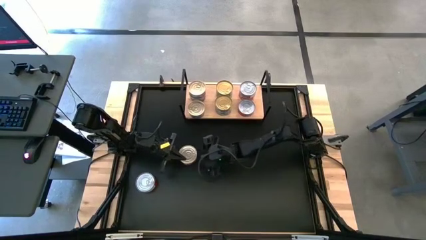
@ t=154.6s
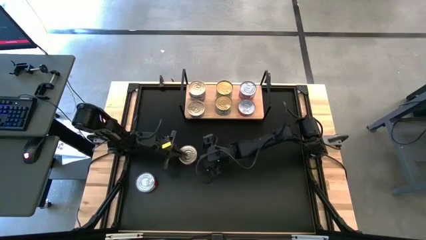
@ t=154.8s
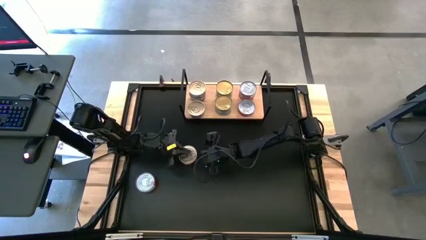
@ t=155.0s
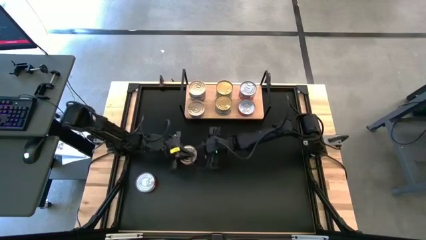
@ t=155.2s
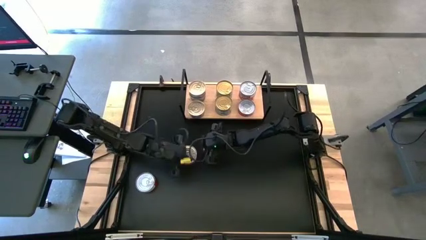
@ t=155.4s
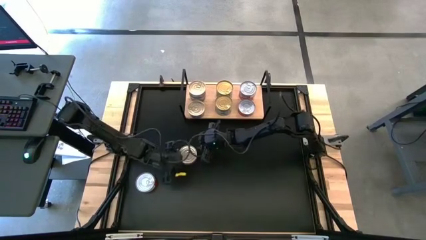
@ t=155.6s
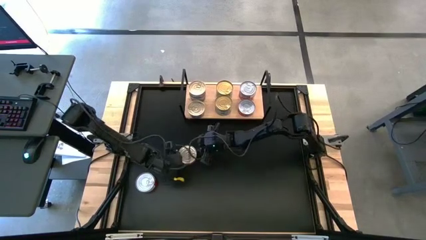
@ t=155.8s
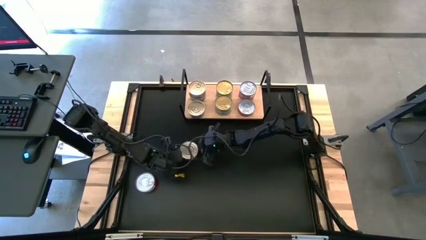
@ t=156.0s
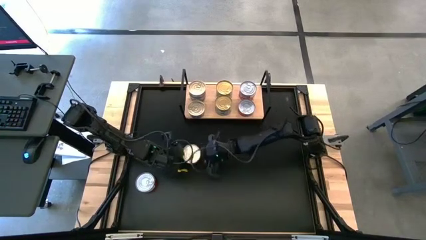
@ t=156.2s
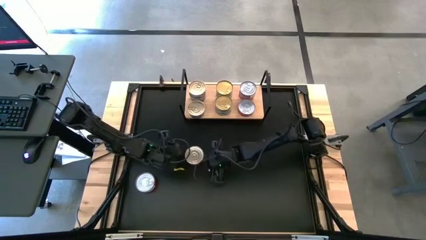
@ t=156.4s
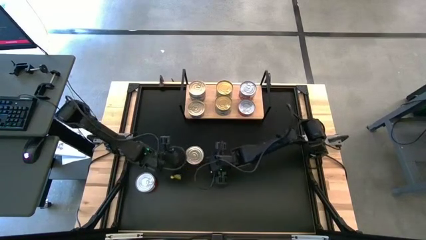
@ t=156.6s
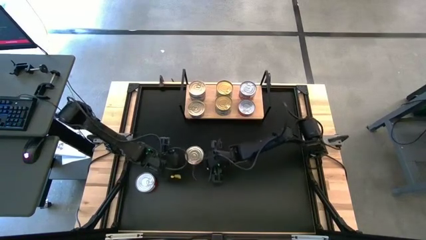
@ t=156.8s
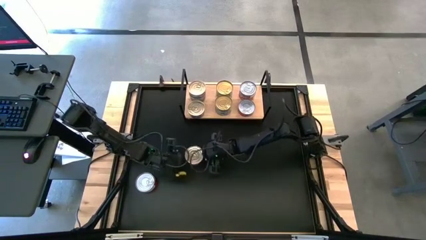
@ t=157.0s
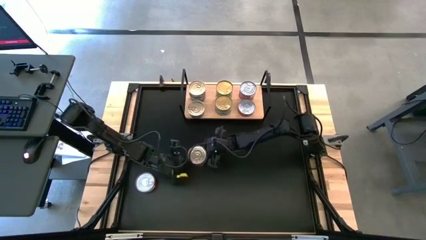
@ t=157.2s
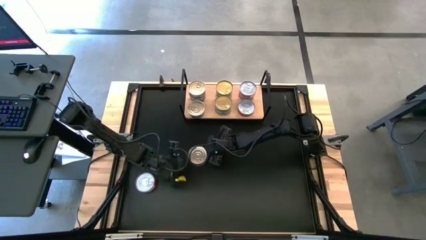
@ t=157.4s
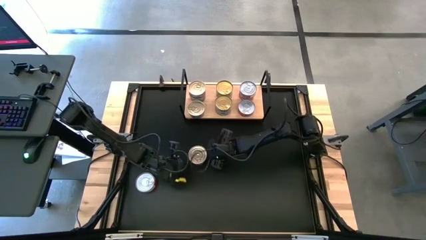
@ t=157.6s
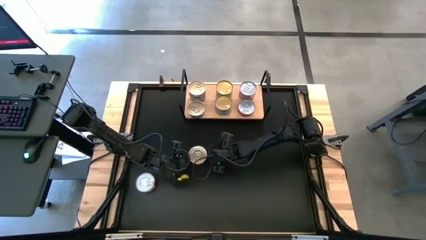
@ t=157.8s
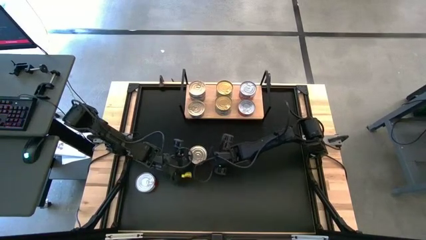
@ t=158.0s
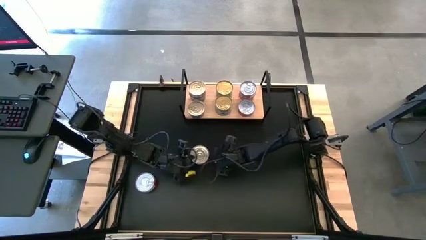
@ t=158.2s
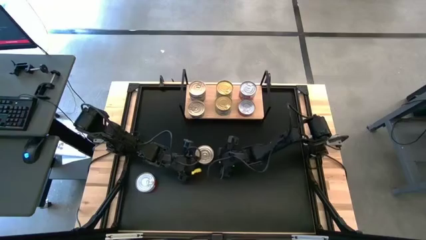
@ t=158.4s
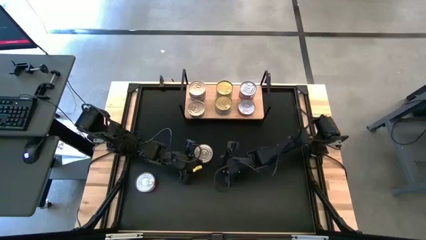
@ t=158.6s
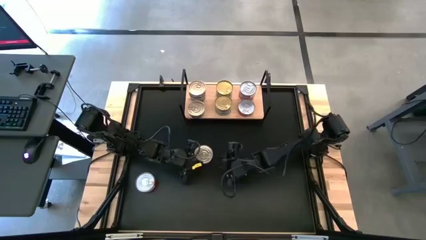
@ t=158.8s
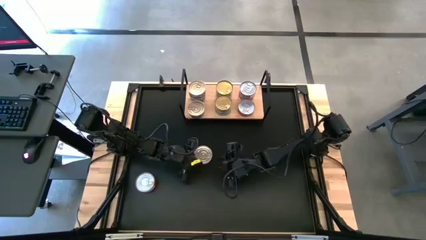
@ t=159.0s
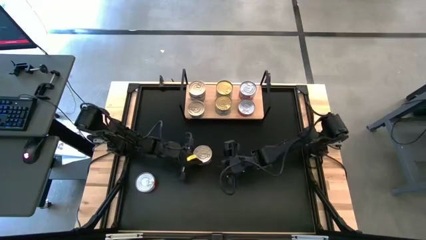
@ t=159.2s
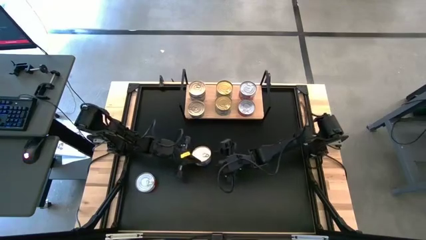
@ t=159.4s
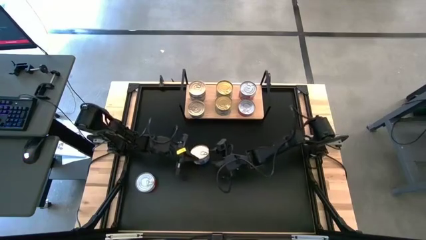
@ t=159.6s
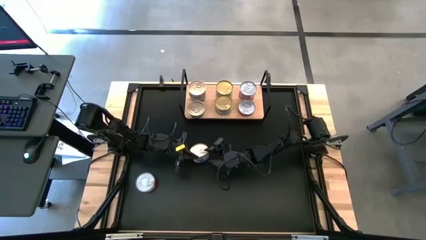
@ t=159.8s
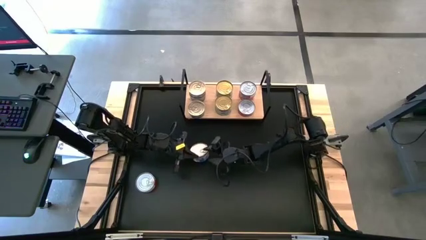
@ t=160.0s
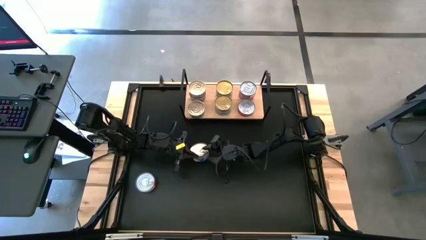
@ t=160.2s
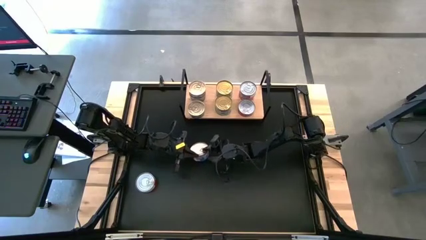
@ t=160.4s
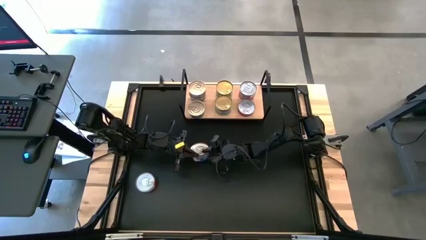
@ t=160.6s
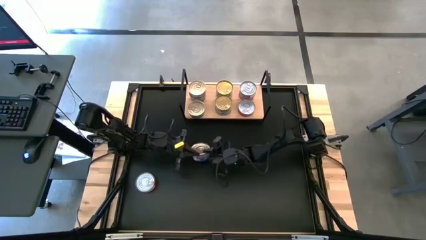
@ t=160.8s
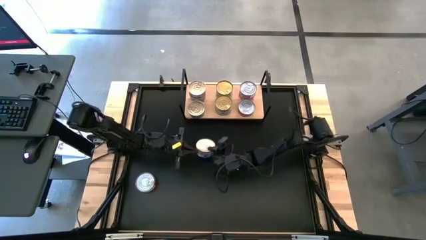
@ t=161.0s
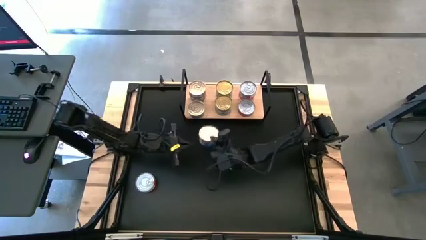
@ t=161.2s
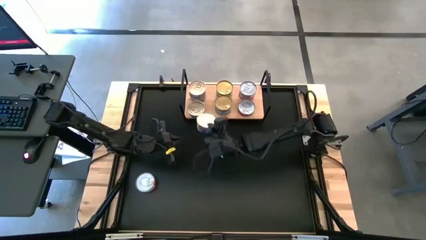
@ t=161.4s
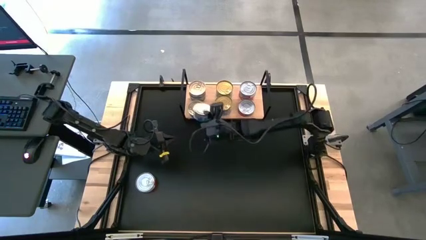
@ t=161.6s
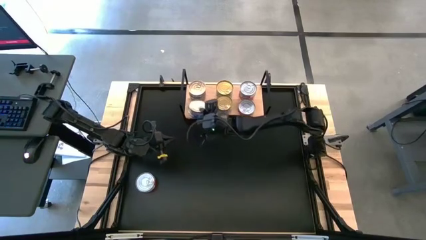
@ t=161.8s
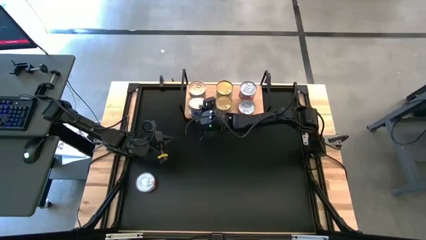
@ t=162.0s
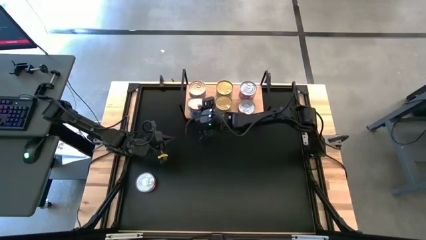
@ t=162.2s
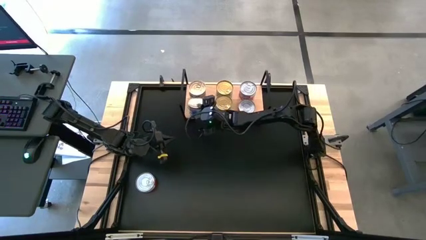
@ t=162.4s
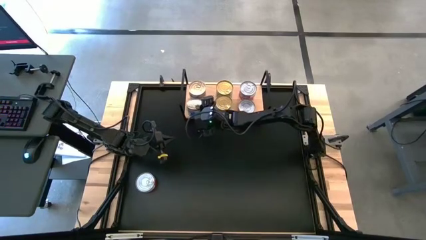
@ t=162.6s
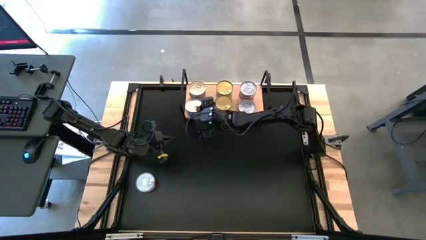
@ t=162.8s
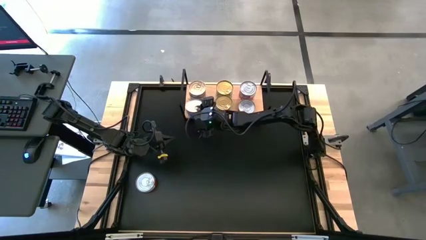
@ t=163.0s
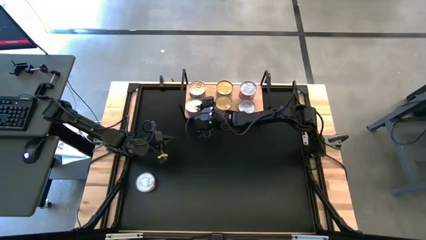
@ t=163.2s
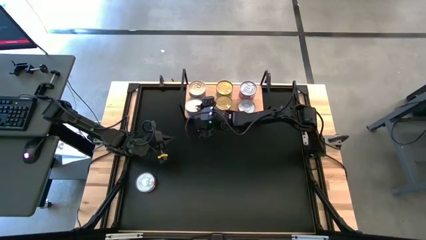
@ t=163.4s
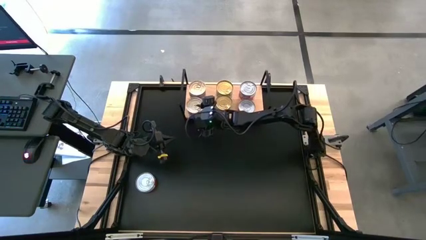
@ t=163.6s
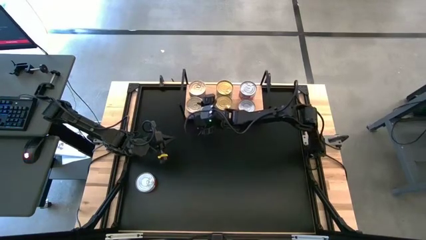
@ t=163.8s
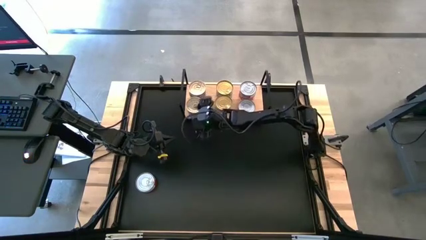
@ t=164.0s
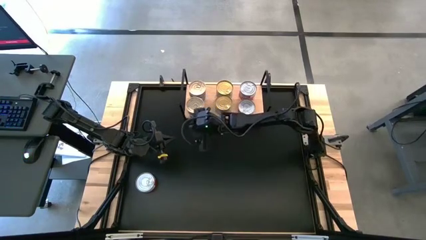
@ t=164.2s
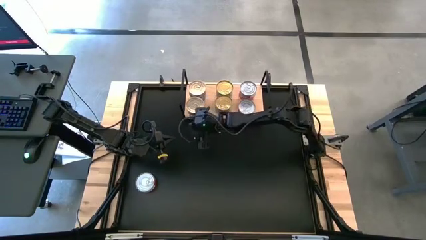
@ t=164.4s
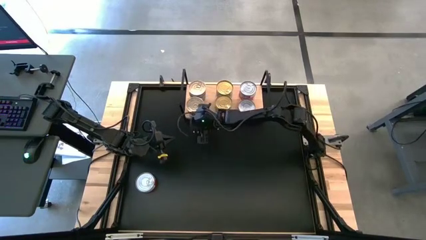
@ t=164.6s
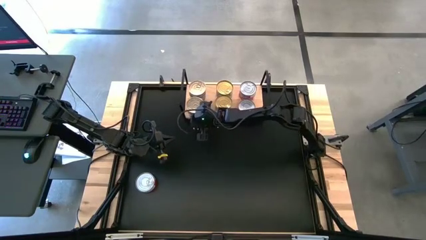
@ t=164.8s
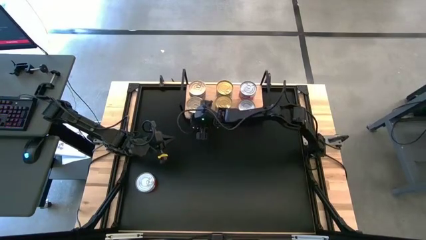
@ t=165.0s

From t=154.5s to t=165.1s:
Task: Stack canned seafood by type on shelf
Stack the blue canned tuna on the bottom blue canned tuna

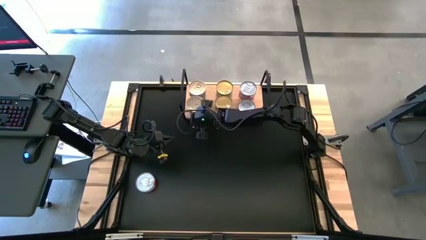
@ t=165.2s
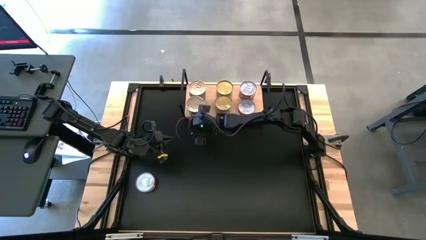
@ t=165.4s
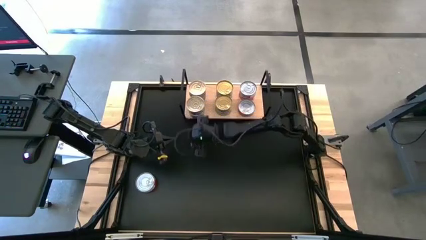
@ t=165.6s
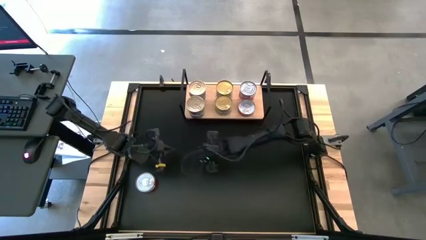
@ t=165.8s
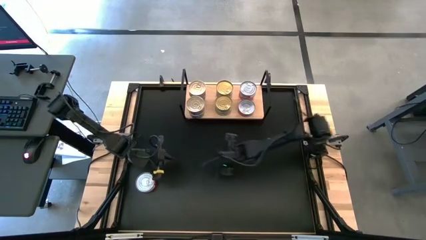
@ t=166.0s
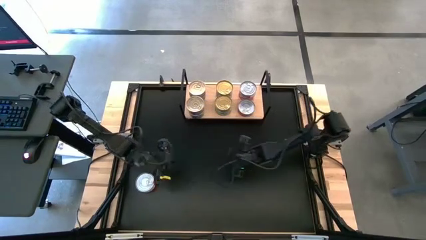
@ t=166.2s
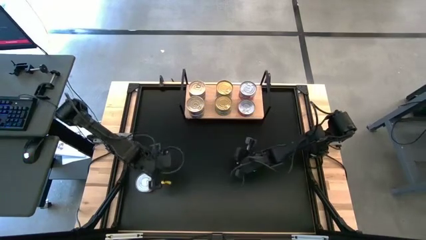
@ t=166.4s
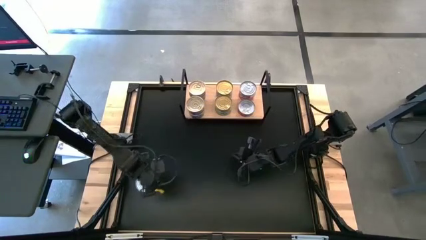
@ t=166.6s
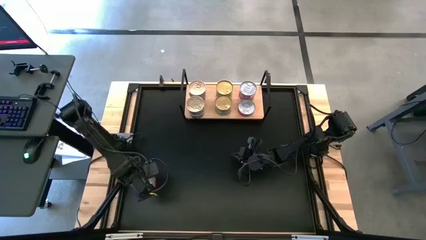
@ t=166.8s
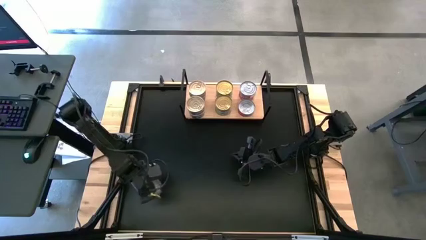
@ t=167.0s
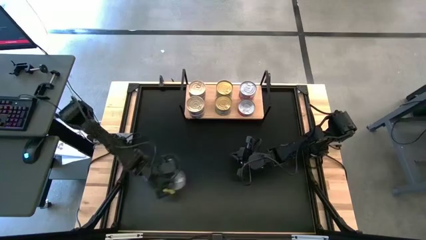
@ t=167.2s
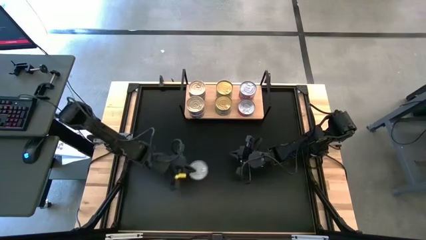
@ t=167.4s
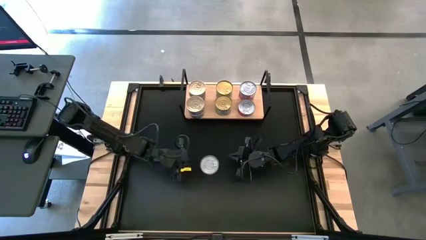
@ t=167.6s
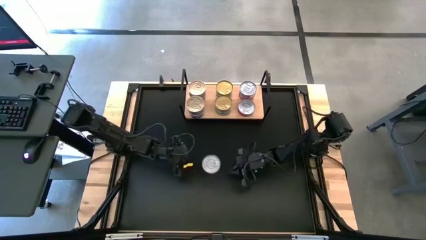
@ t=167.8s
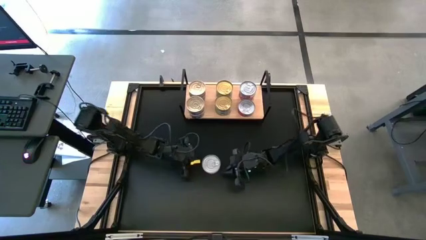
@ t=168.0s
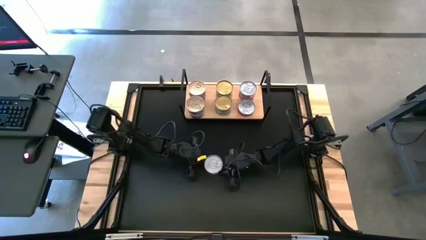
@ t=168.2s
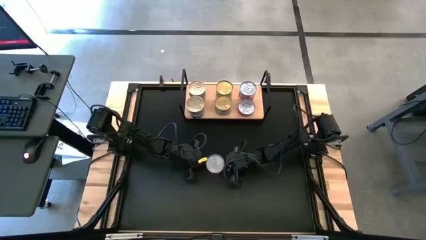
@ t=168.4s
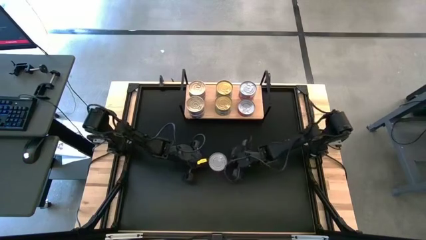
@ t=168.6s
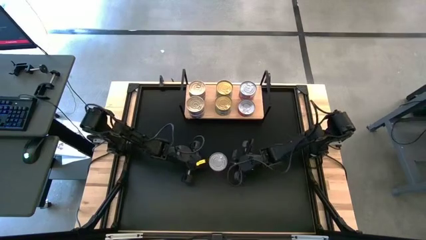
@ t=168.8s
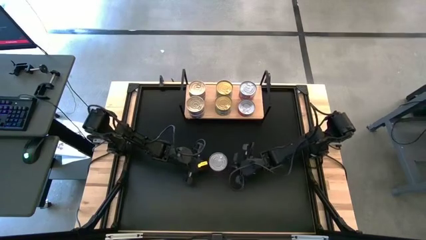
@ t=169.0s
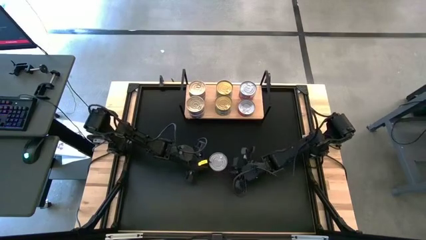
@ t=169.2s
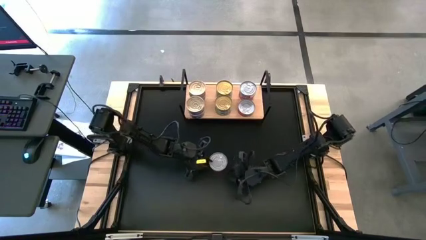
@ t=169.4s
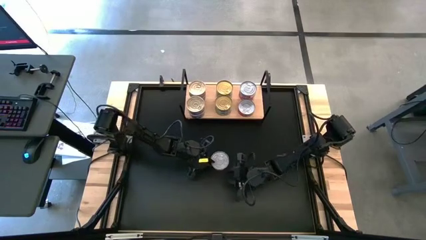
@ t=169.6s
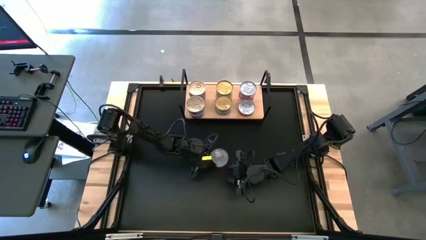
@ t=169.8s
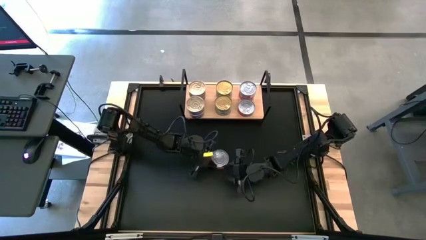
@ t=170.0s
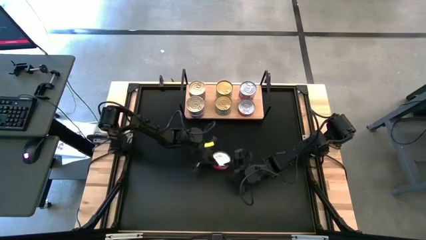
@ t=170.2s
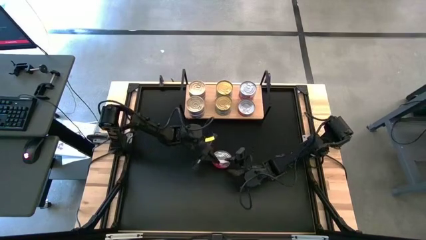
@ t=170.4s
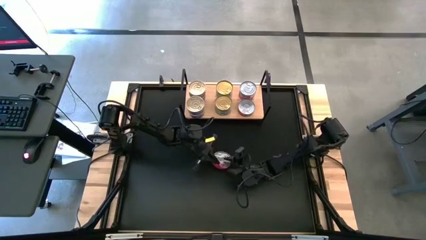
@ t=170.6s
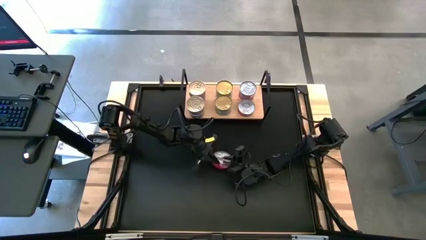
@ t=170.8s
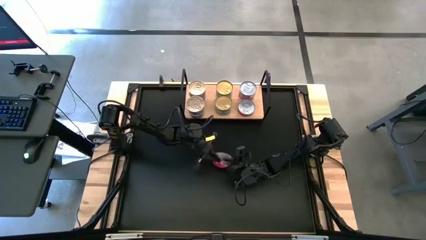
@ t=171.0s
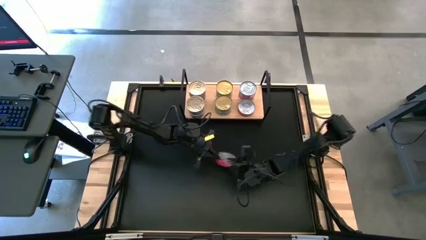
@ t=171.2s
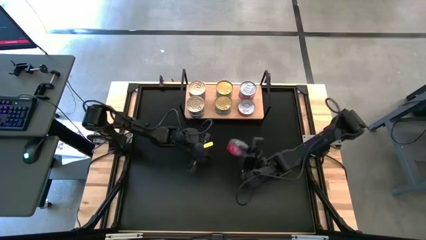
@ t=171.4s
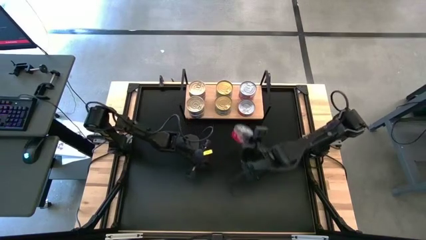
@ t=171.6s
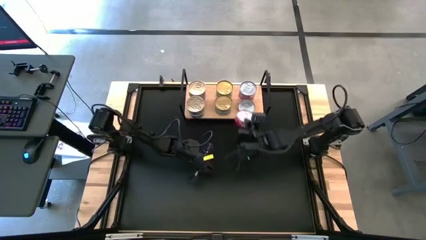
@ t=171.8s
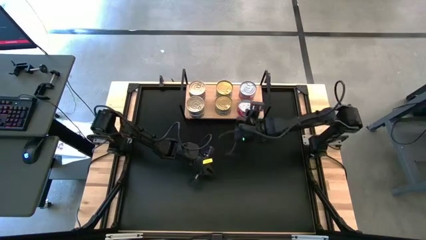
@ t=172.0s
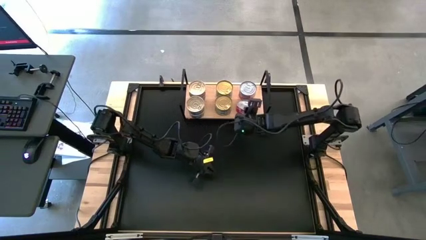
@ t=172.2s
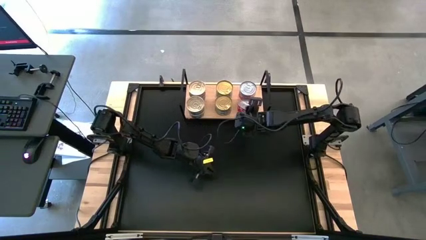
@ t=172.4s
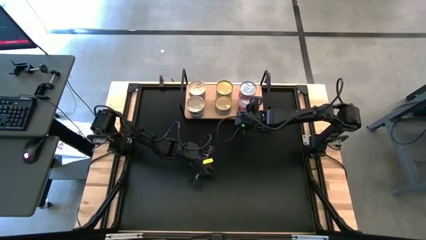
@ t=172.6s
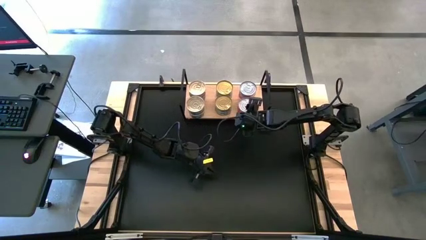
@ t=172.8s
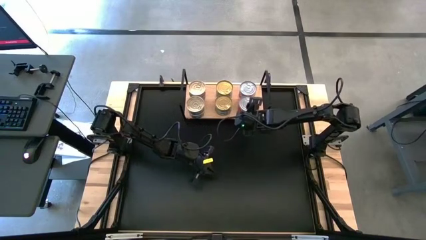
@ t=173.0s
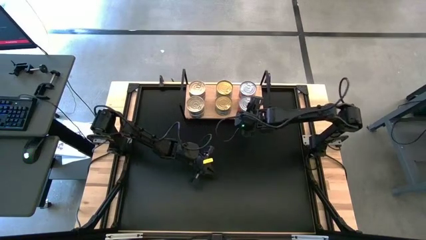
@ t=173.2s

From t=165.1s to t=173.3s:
Stack the red canned tuna on the bottom red canned tuna
